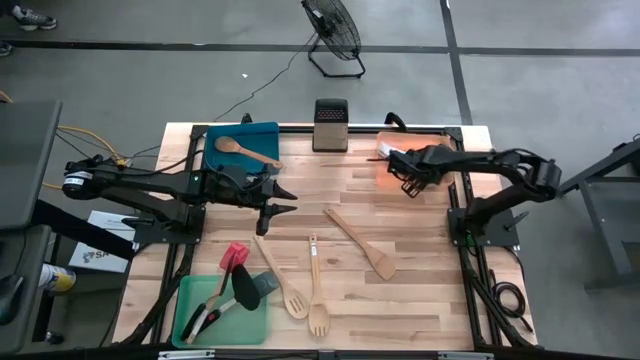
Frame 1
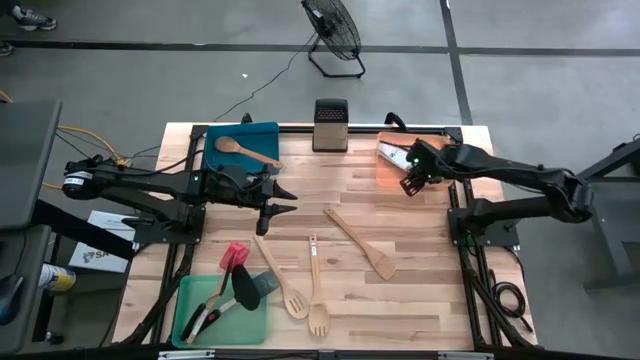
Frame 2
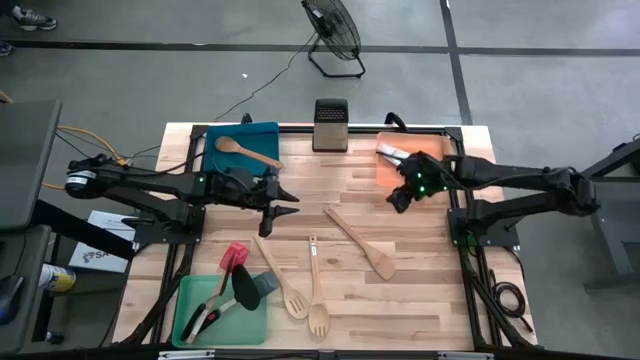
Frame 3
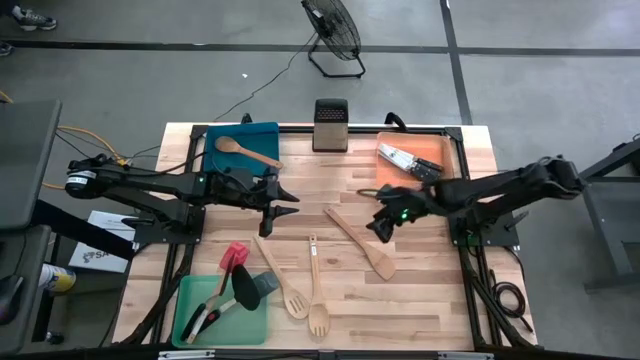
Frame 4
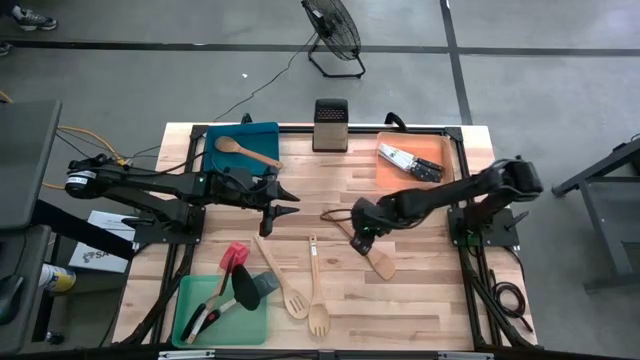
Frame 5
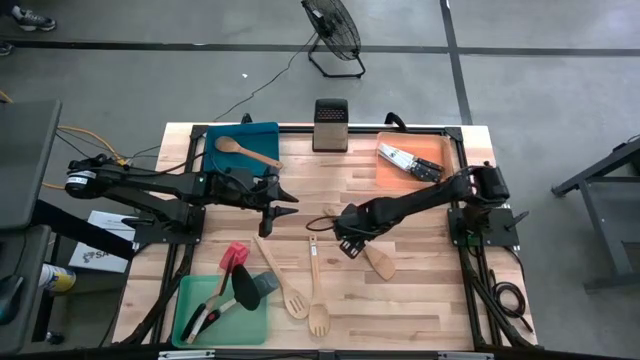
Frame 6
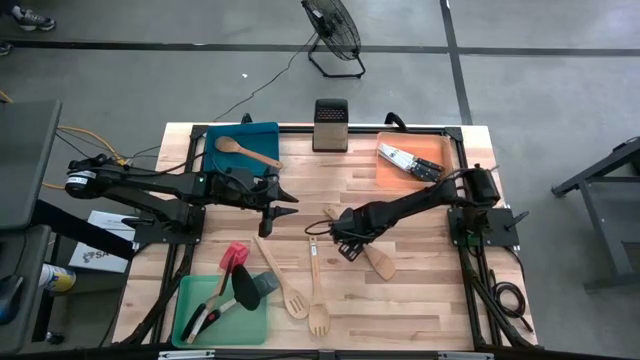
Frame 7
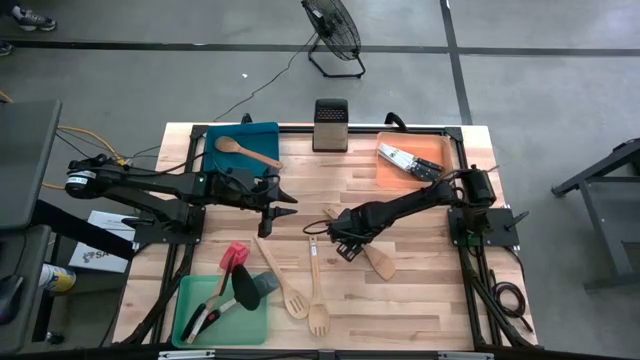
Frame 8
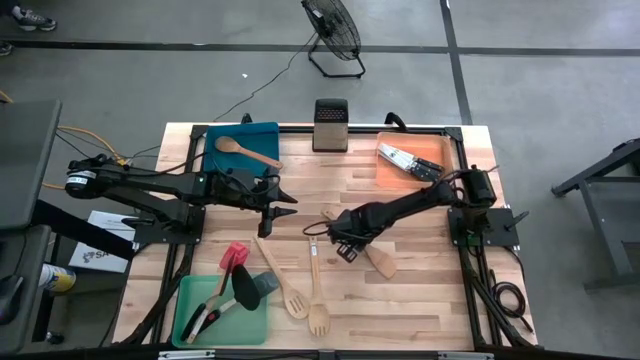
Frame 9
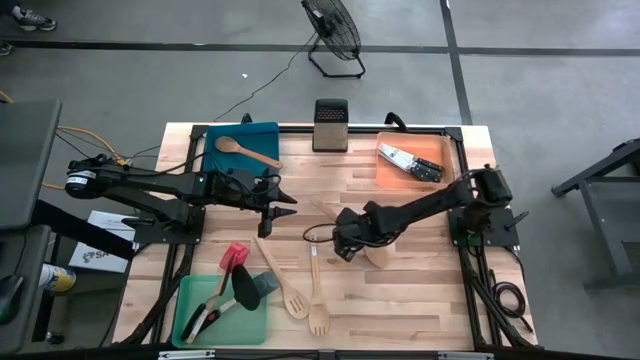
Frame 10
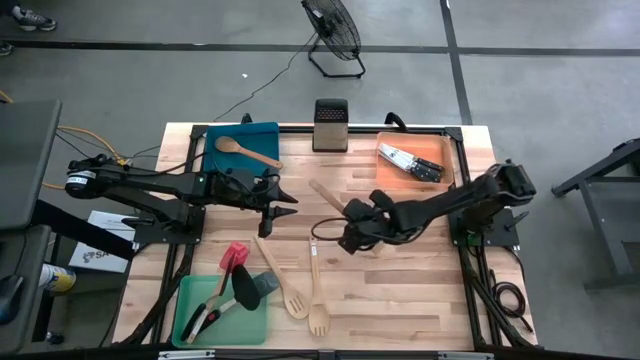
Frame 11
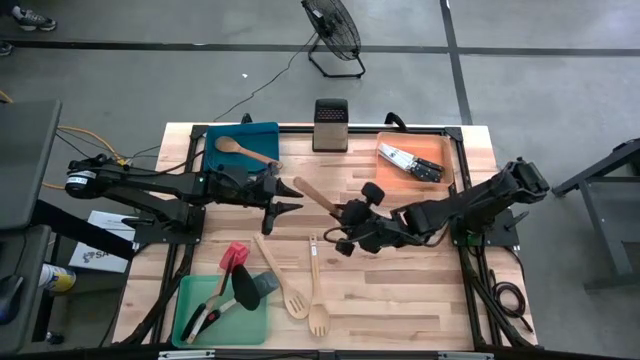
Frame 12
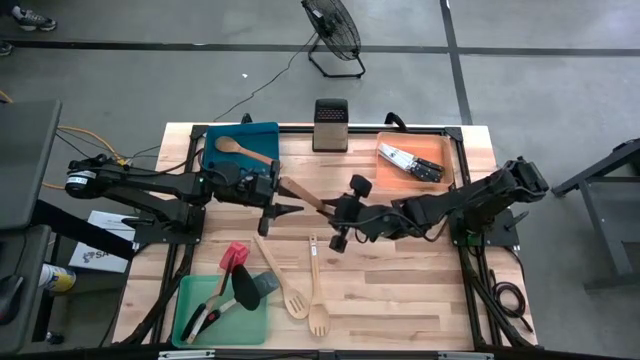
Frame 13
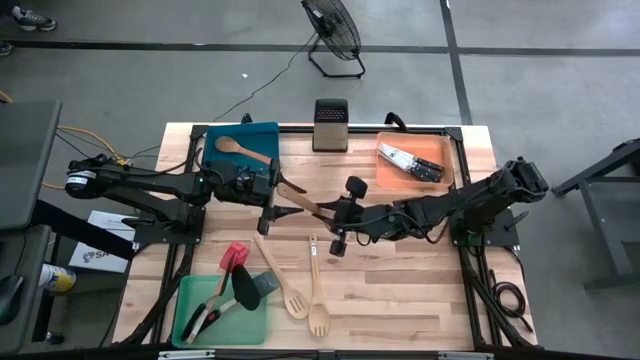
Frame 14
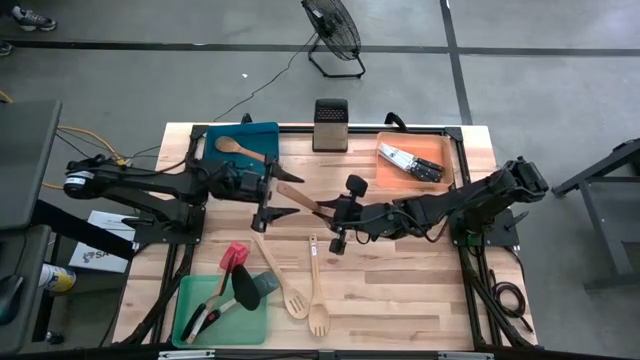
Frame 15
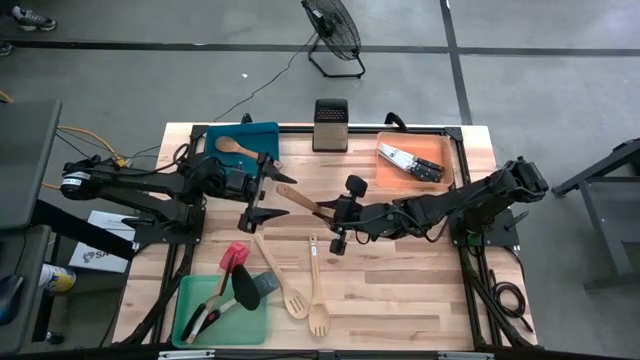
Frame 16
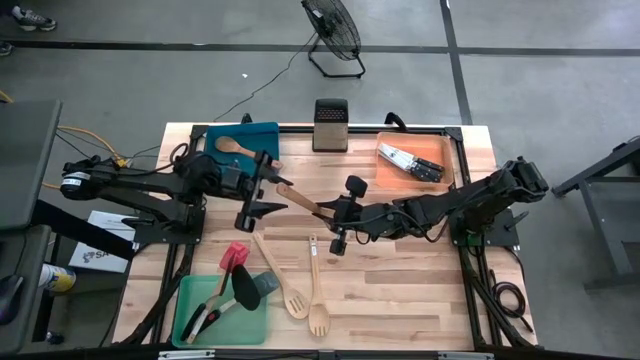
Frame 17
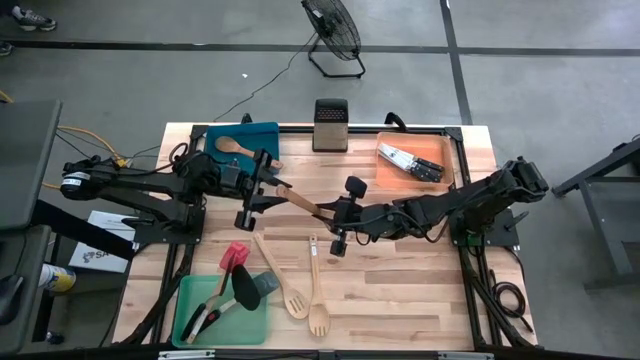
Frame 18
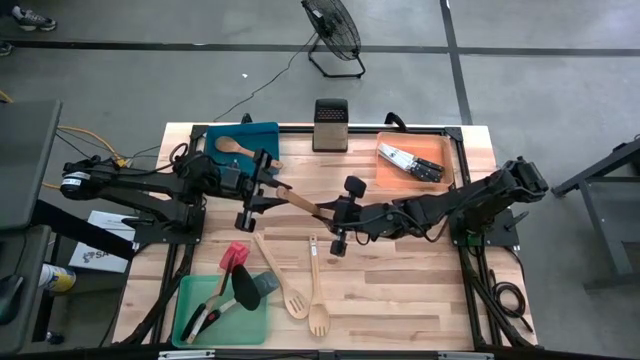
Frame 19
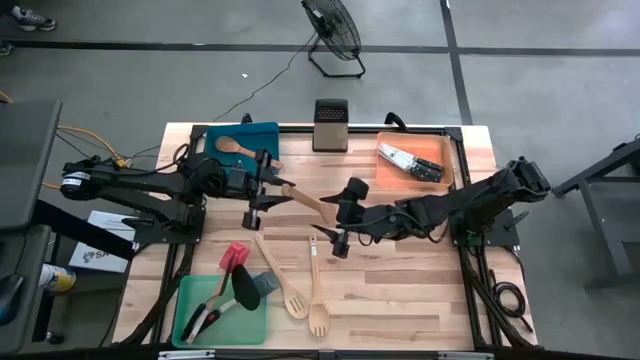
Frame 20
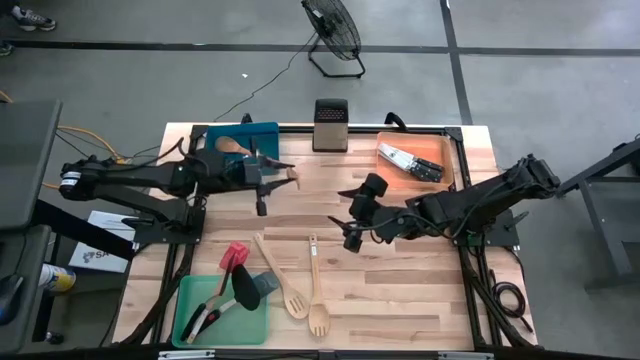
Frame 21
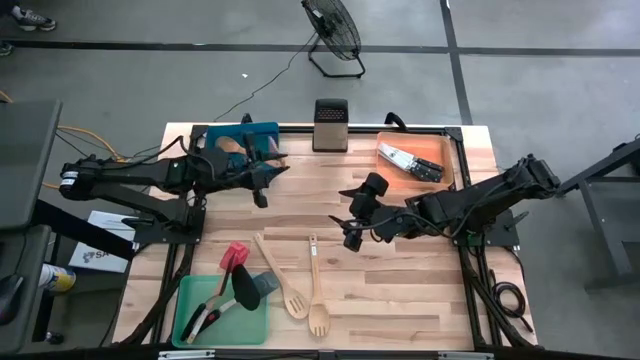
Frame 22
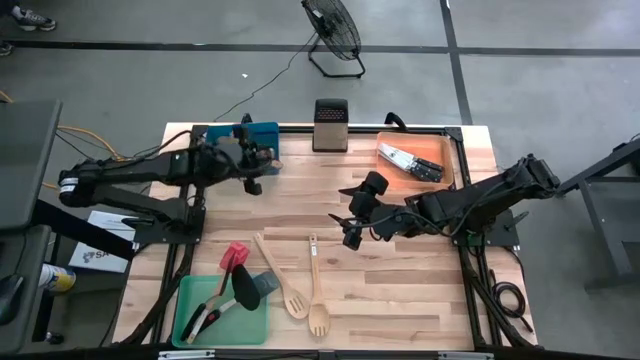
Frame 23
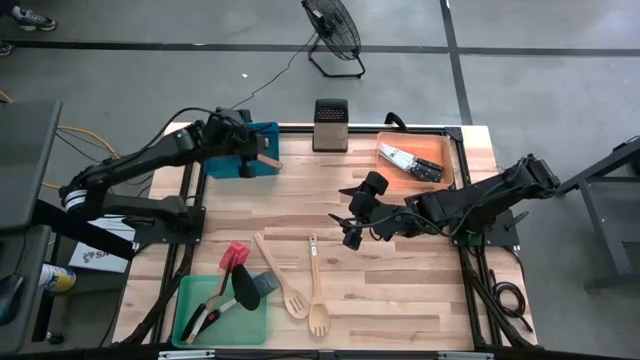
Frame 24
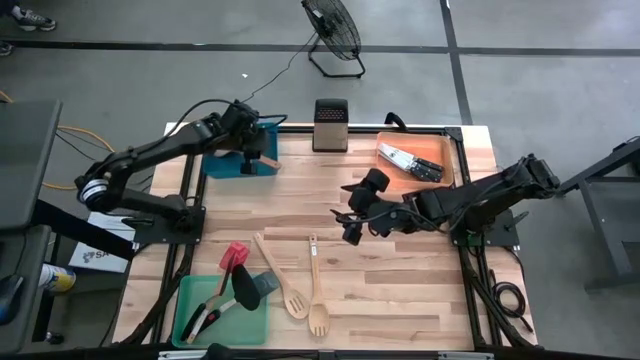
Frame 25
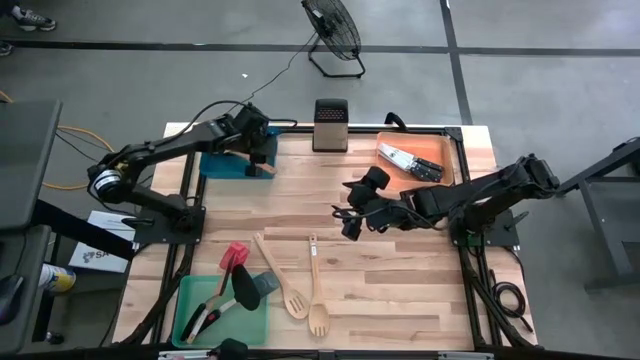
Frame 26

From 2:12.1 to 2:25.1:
Task: Pick & Place Kitchen Items
Put the brown wooden spoon into the blue bin

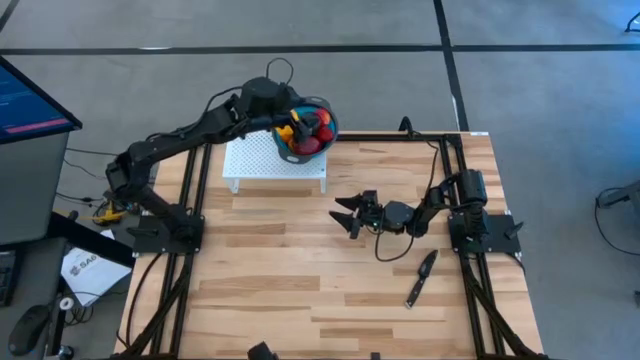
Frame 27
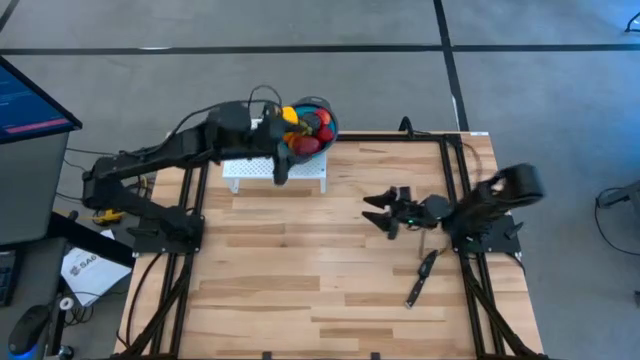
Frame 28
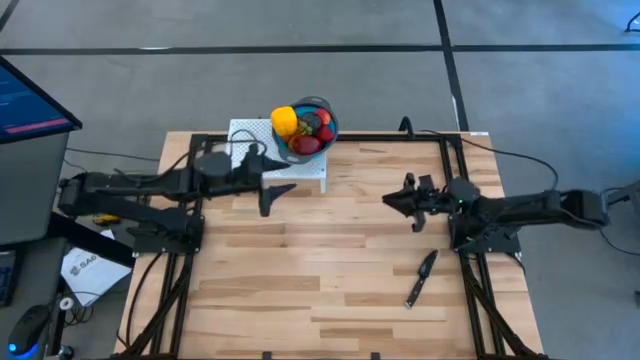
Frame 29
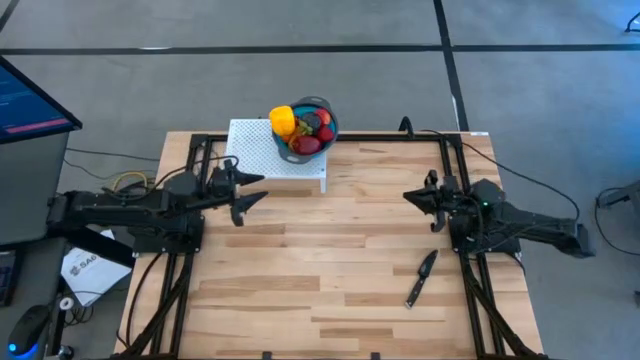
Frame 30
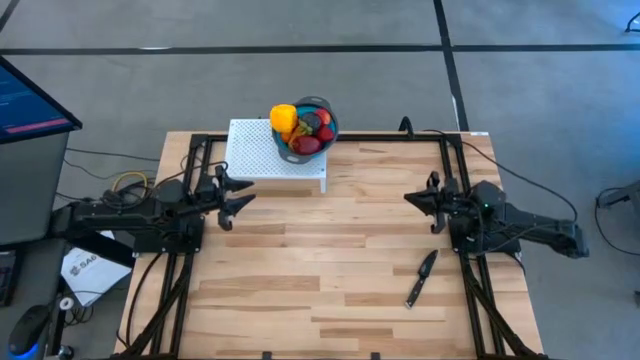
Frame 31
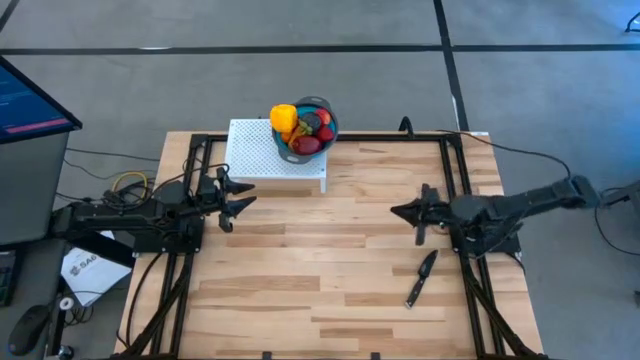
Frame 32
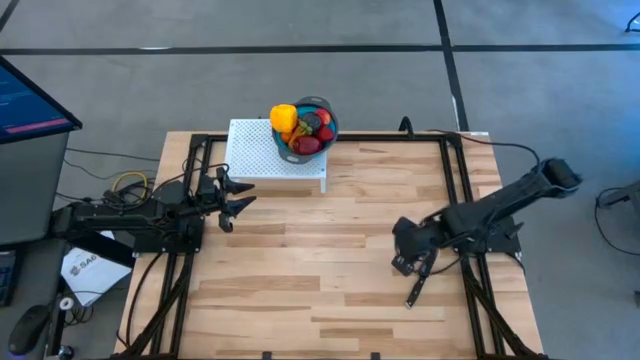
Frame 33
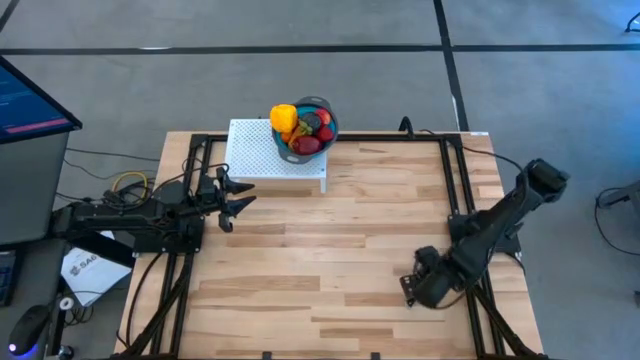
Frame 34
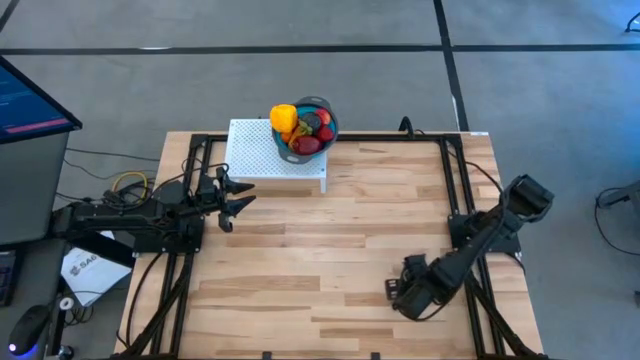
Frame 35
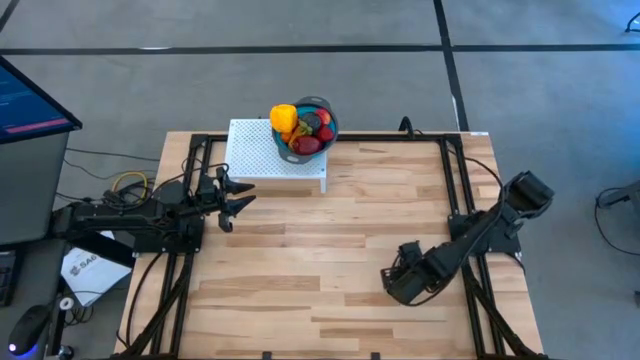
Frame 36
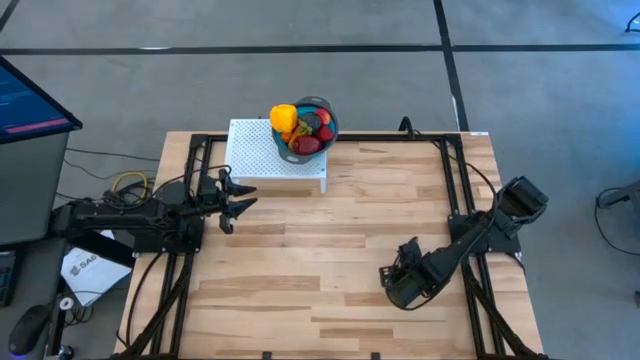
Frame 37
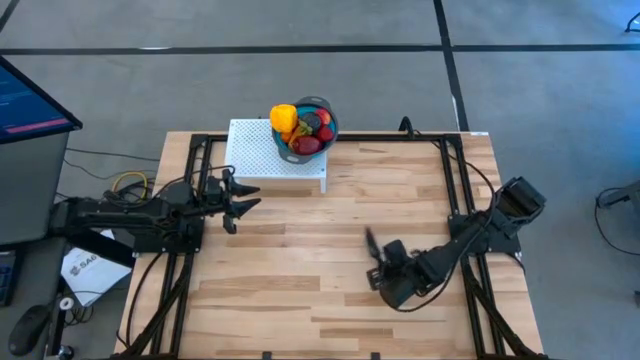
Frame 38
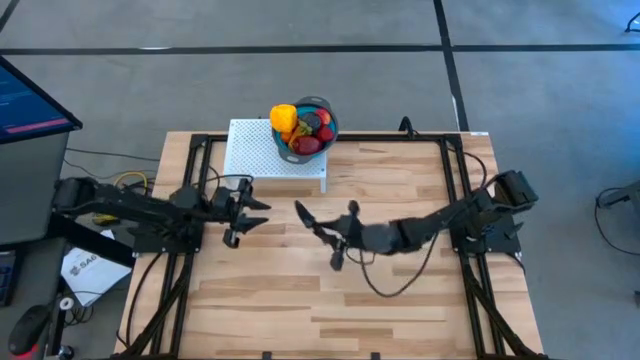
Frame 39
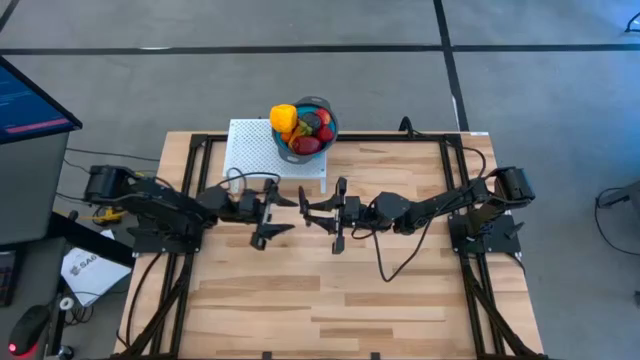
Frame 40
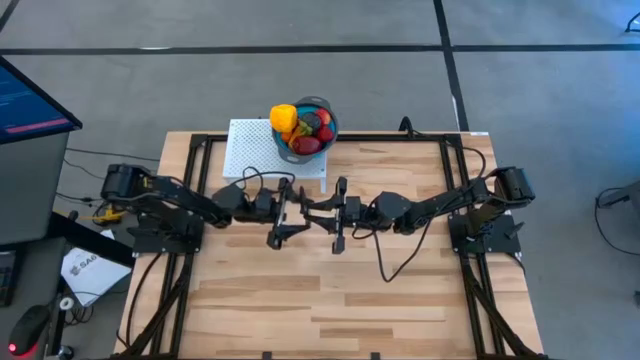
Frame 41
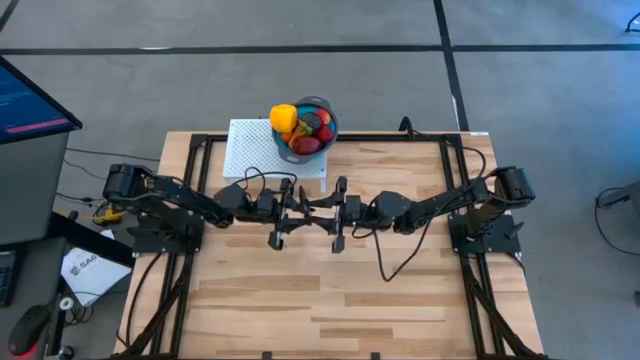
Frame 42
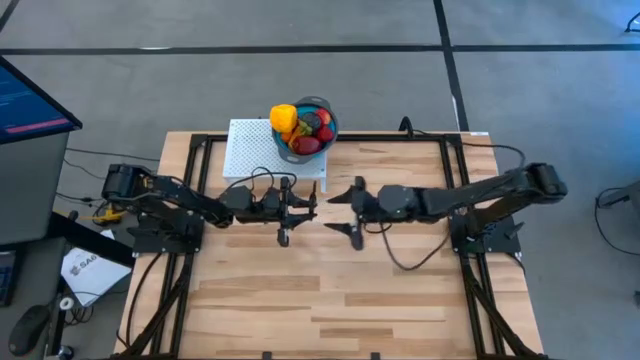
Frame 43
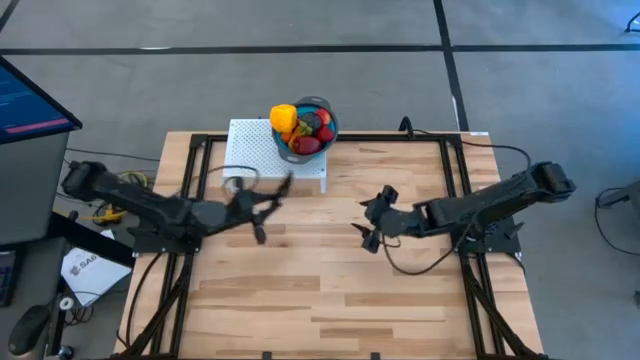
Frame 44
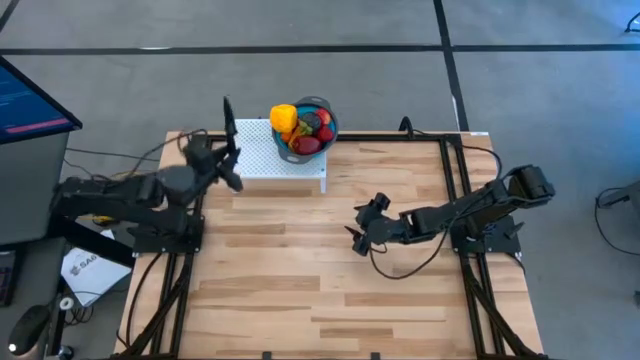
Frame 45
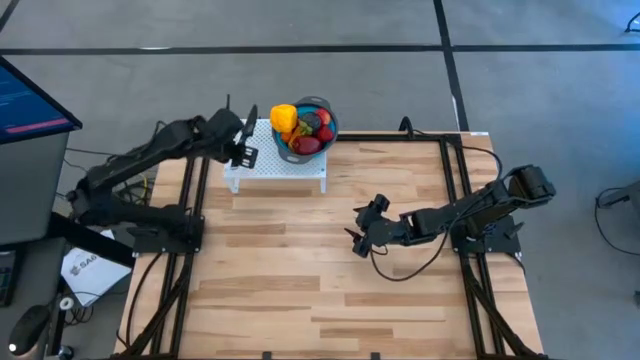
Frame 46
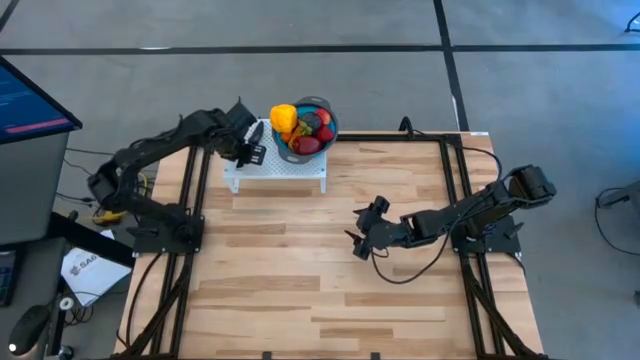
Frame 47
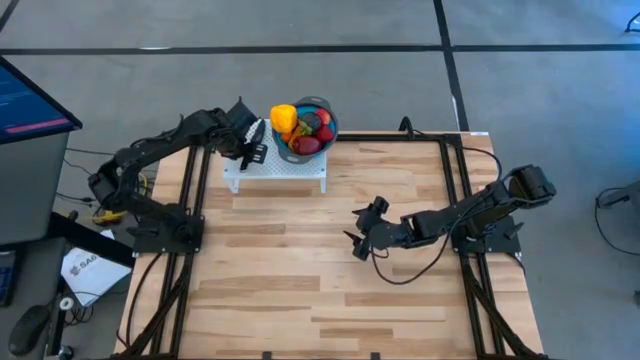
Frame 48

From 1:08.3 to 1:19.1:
Task: Pick & Place Fruit
Put the black knife on the shelf
